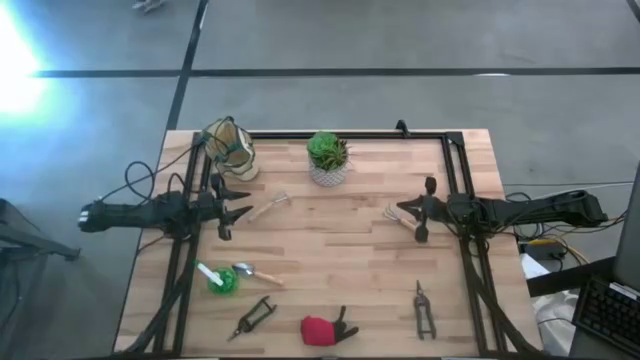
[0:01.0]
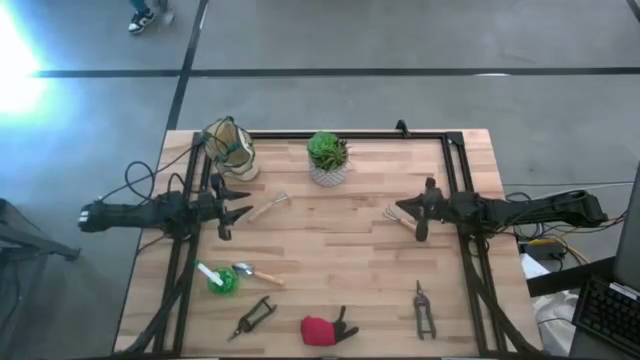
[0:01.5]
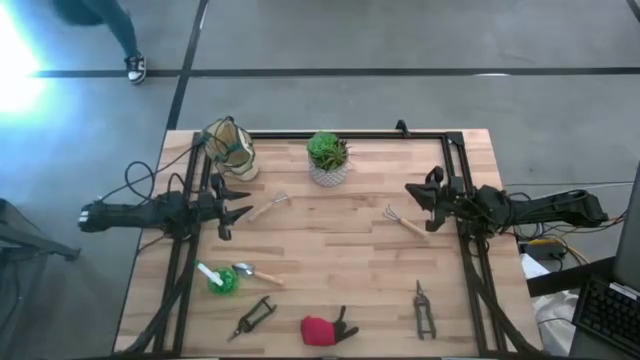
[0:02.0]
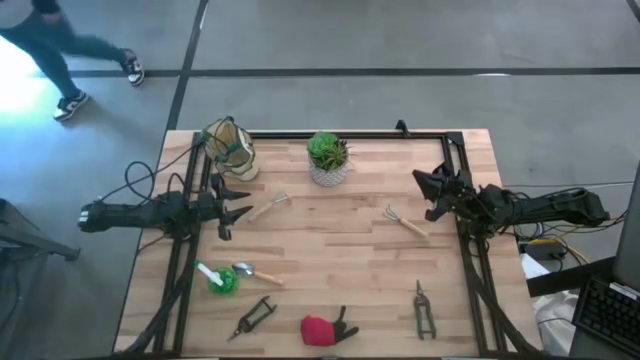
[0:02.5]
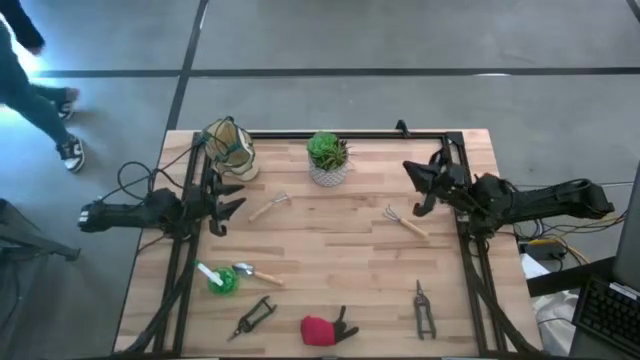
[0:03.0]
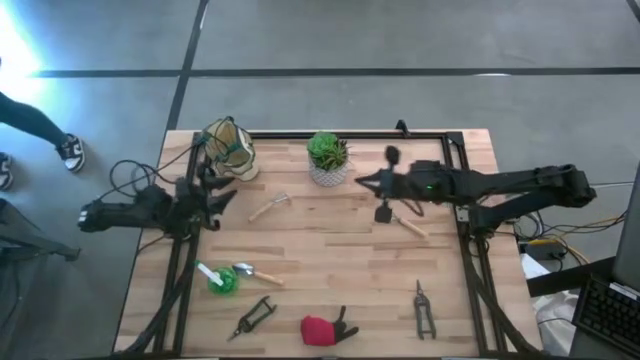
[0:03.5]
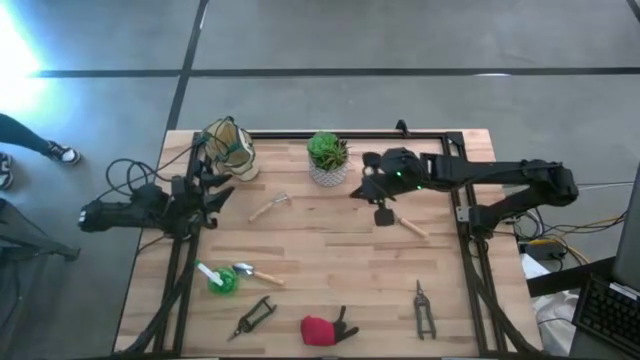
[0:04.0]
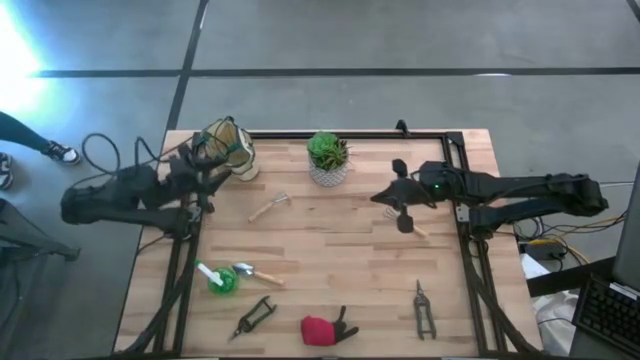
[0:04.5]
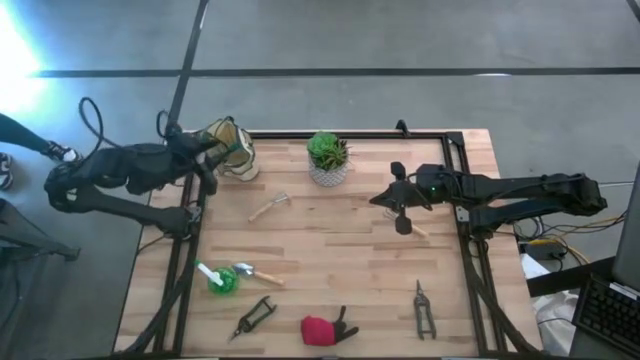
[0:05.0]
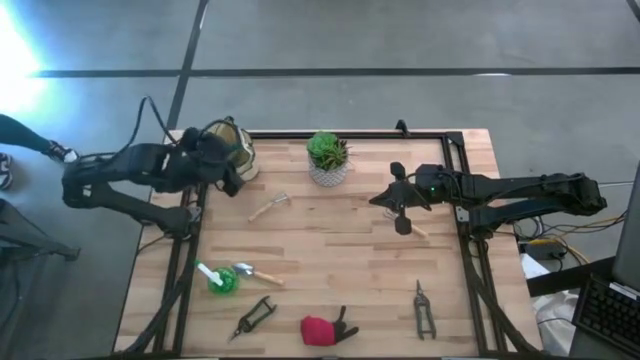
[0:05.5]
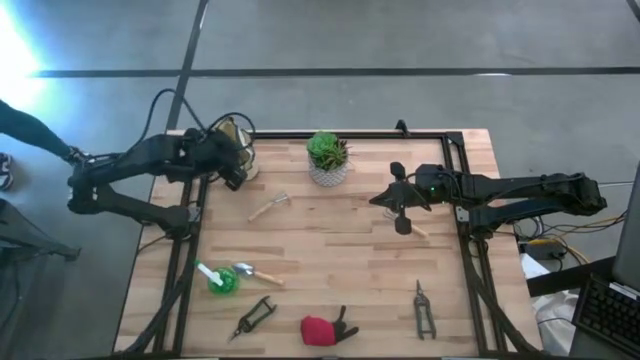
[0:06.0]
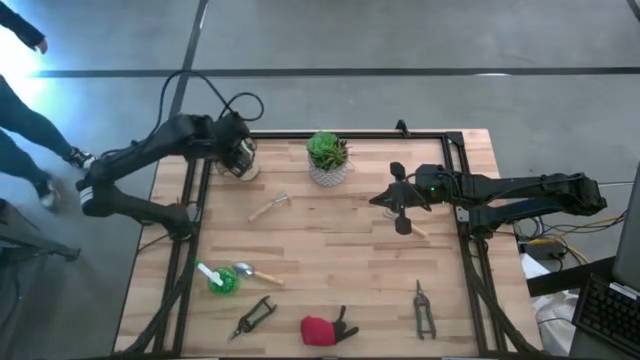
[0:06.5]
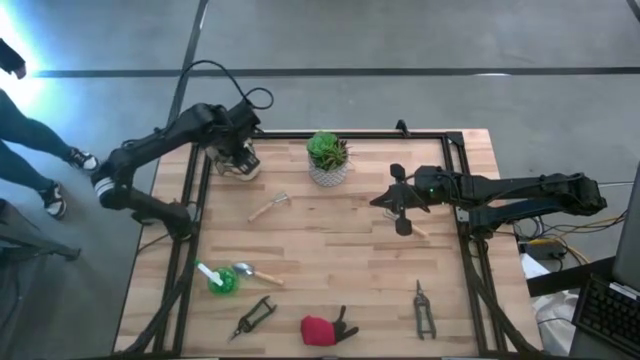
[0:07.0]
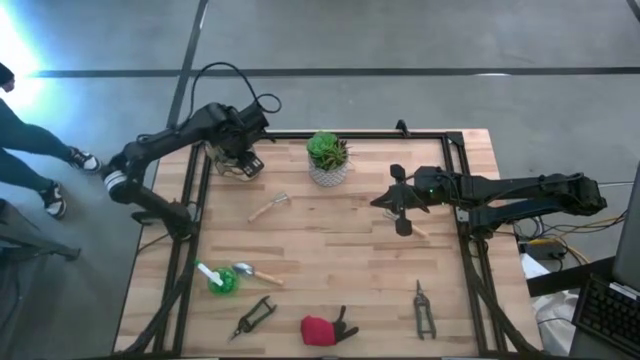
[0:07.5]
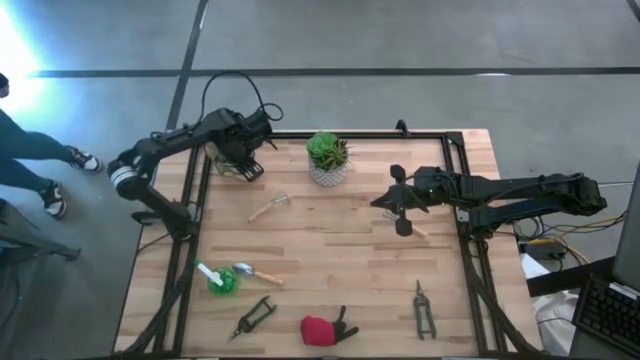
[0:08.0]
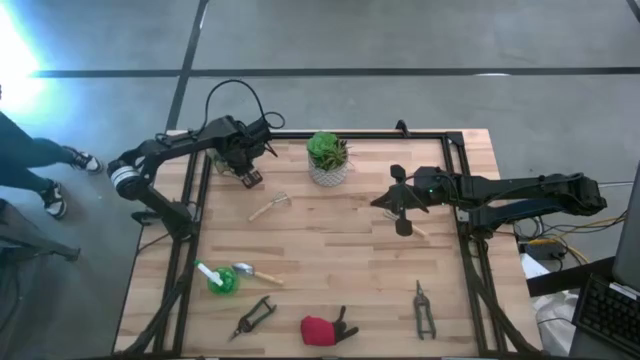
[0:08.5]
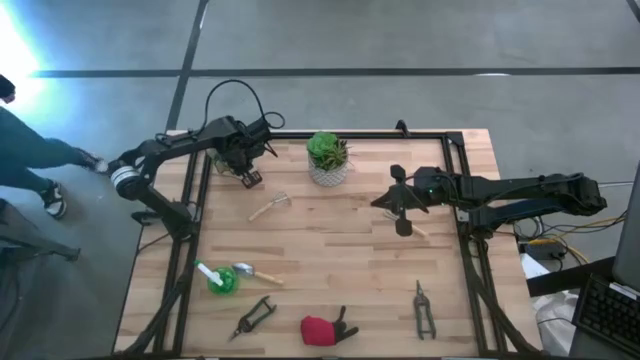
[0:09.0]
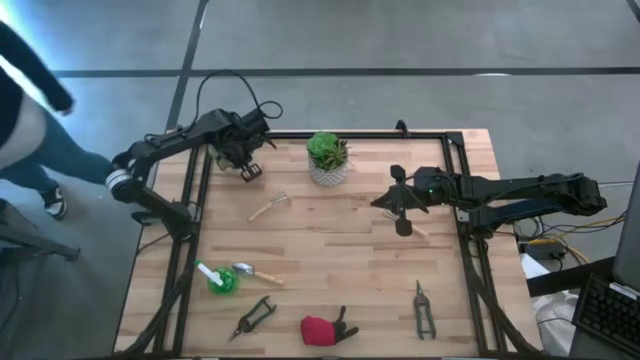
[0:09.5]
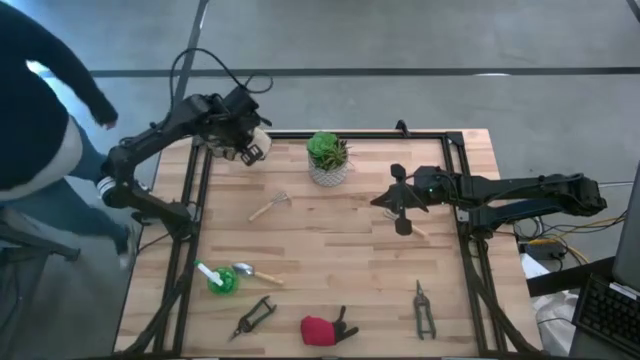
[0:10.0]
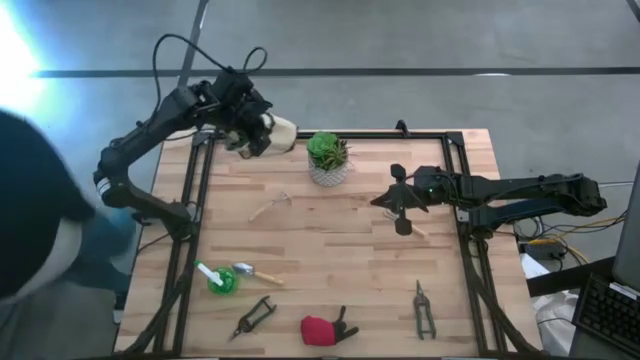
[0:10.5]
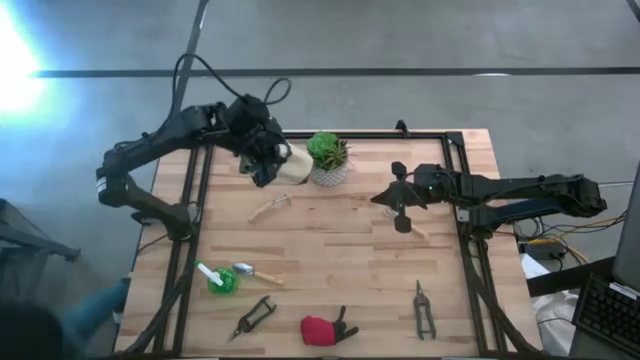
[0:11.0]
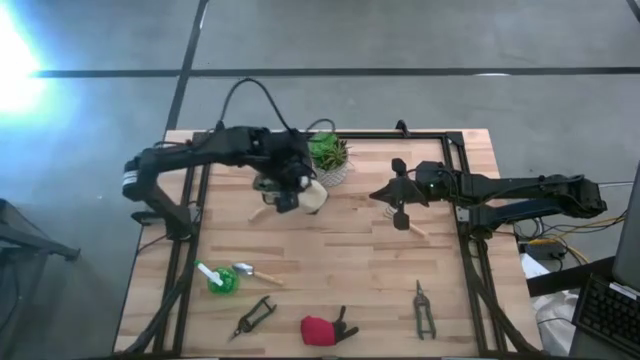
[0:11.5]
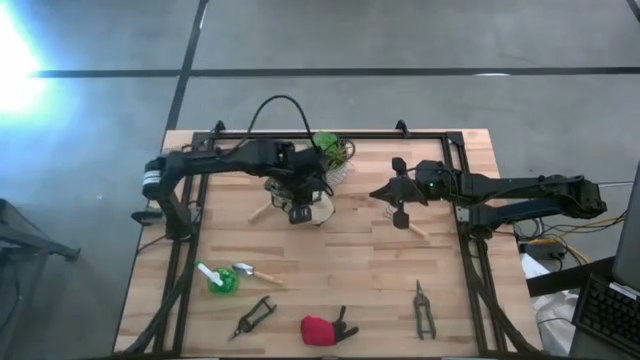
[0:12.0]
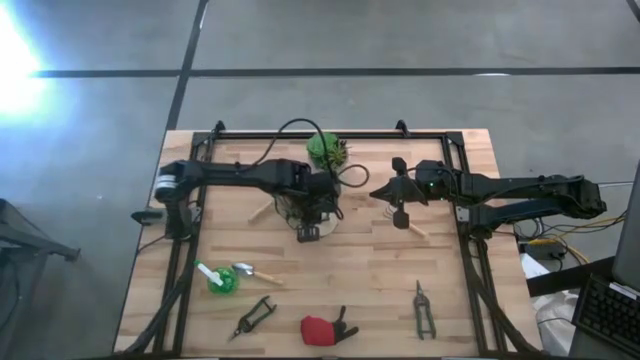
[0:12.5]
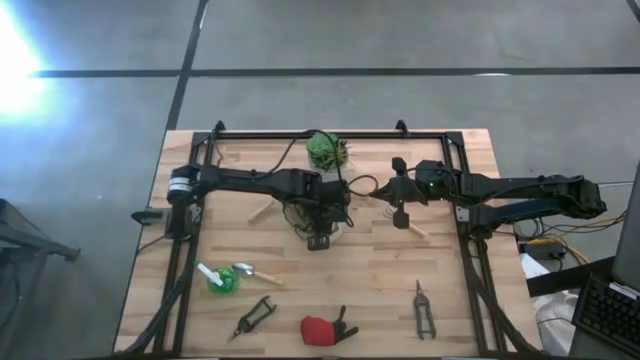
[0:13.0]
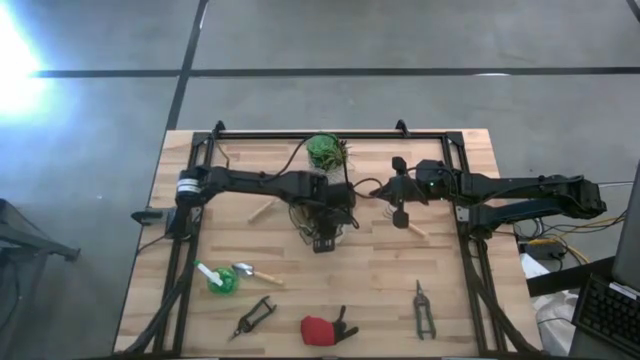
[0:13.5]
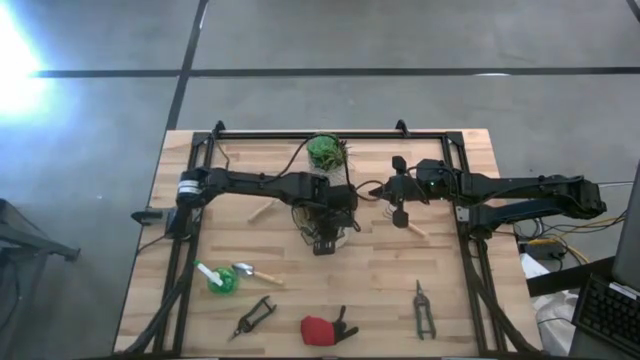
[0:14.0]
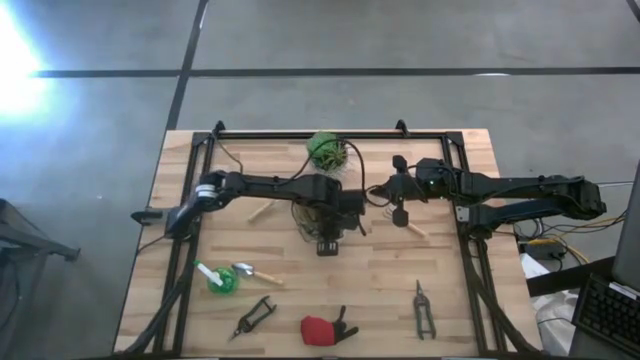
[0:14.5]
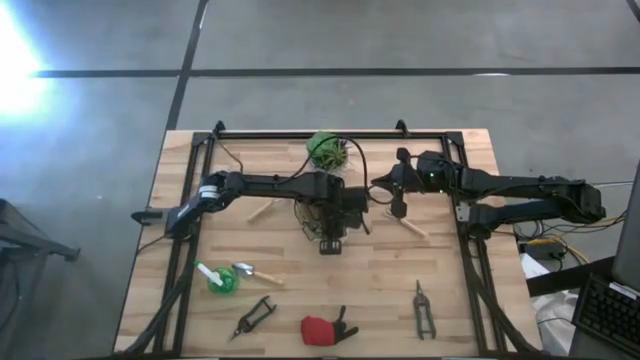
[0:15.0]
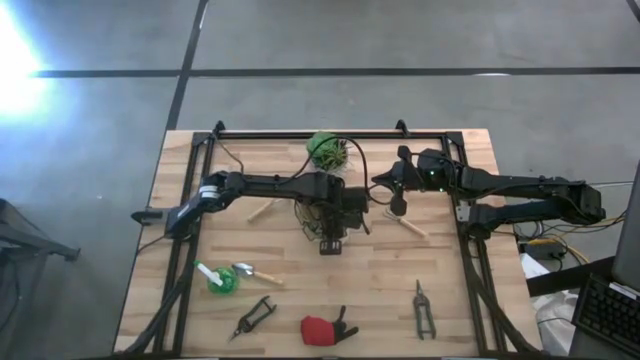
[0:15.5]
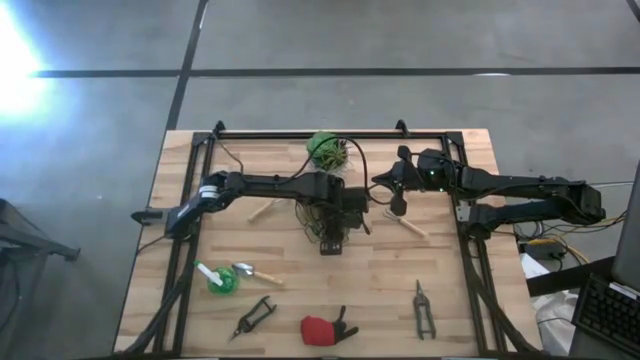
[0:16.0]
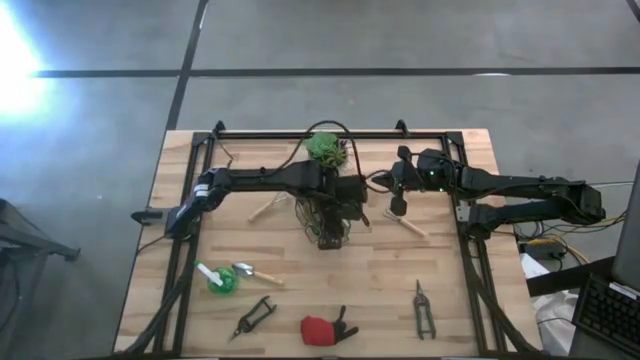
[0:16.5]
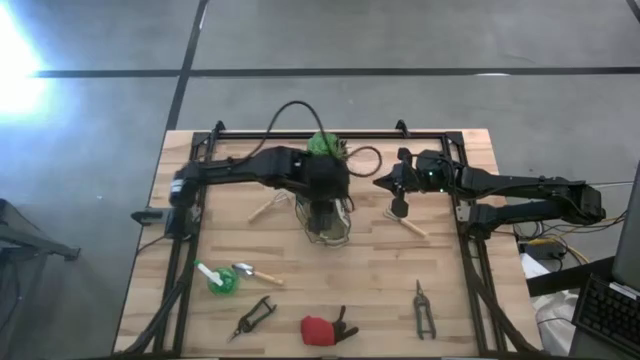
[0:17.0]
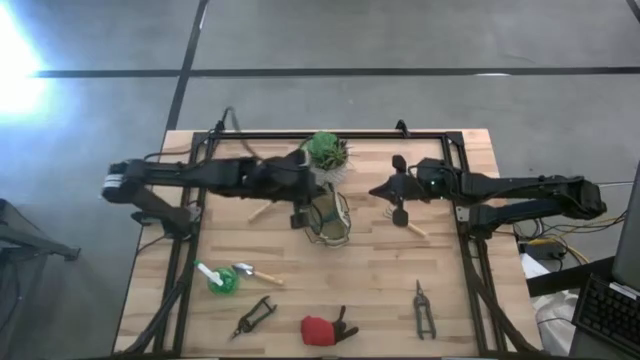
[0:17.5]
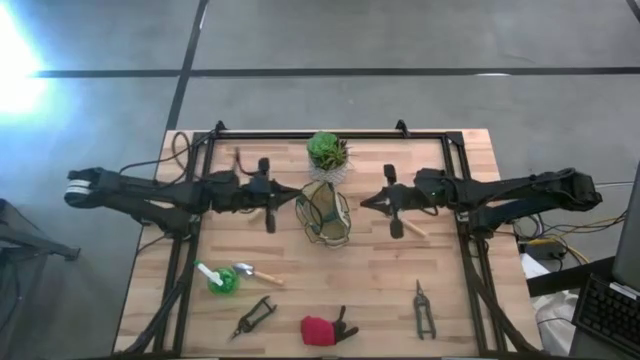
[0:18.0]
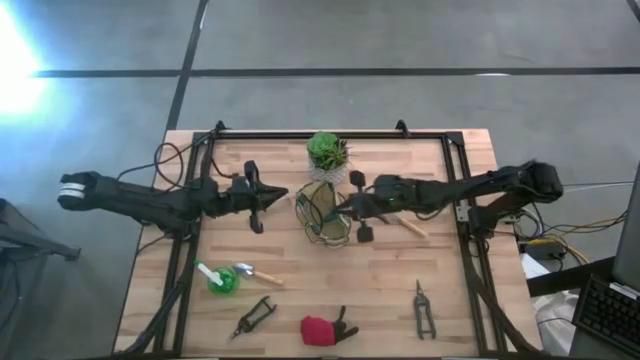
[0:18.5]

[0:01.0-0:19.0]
Task: Pick & Place Garden tools in Gardening bag
Prepare the gardening bag
